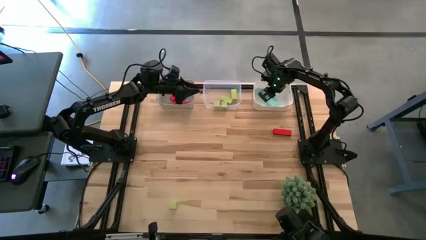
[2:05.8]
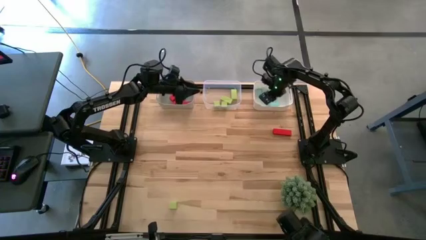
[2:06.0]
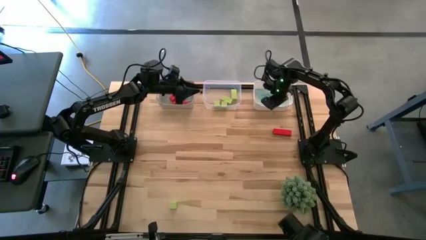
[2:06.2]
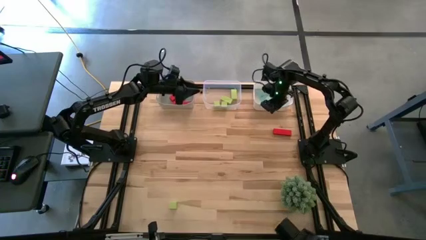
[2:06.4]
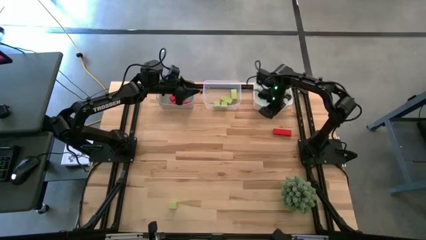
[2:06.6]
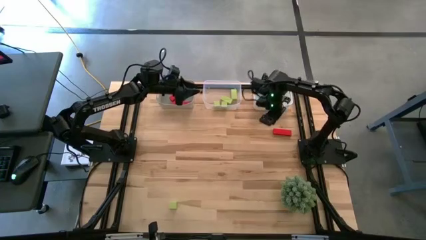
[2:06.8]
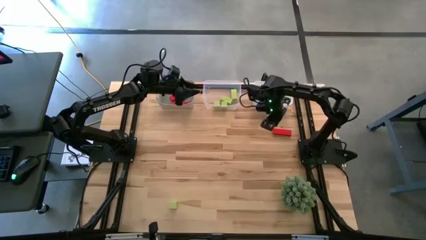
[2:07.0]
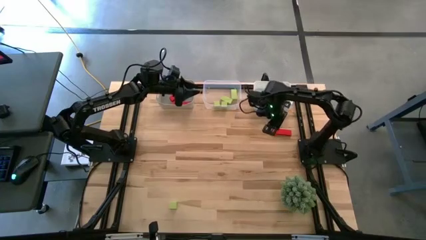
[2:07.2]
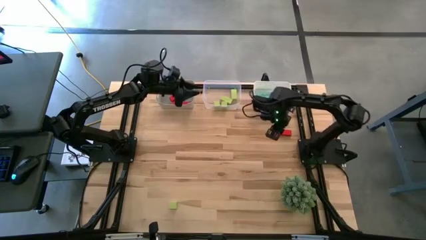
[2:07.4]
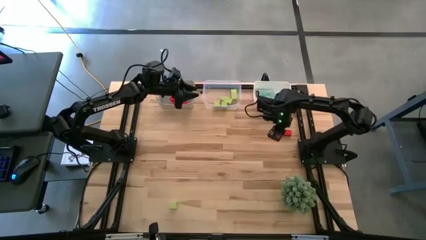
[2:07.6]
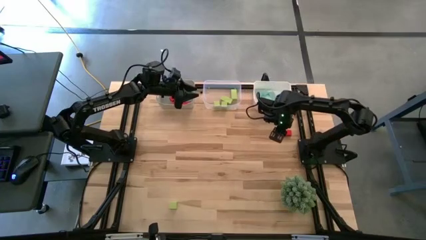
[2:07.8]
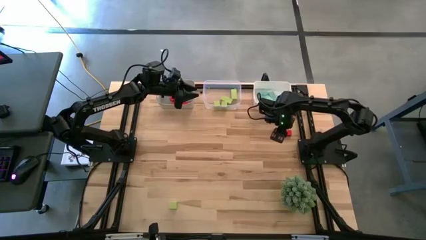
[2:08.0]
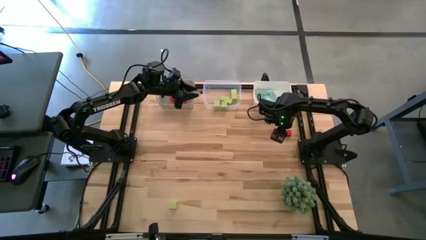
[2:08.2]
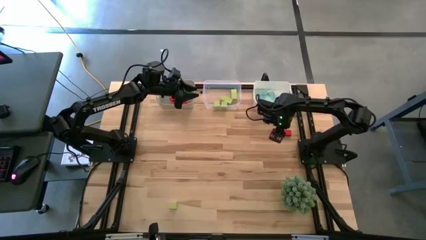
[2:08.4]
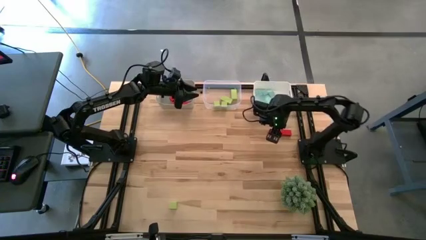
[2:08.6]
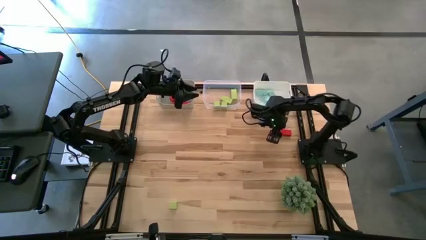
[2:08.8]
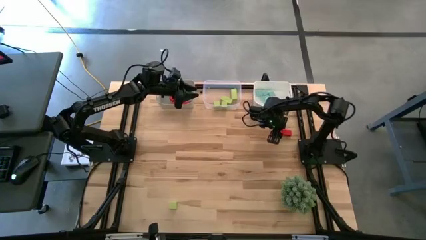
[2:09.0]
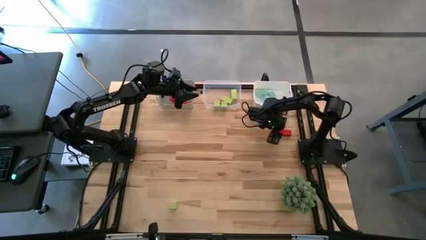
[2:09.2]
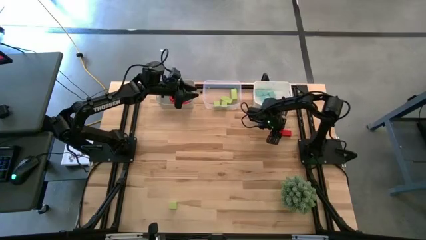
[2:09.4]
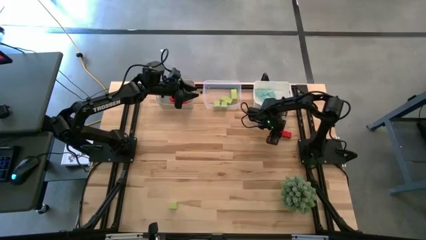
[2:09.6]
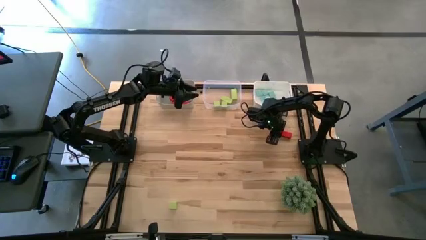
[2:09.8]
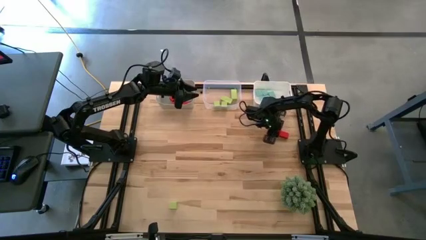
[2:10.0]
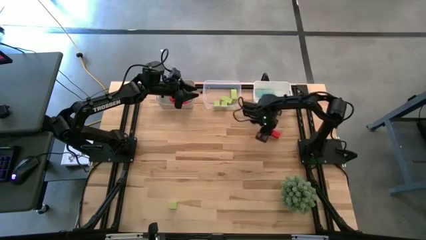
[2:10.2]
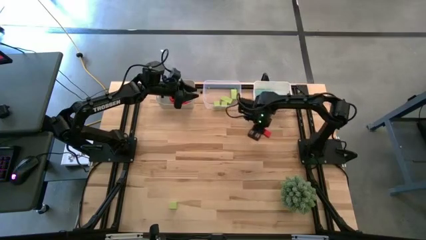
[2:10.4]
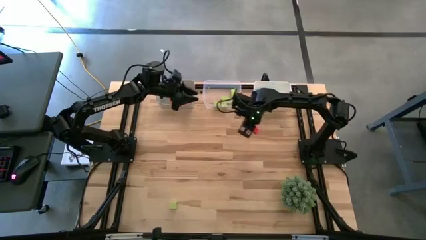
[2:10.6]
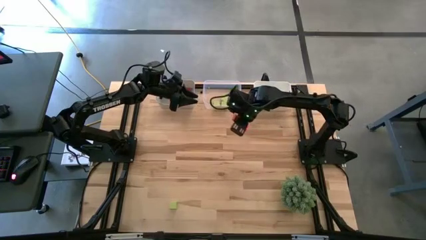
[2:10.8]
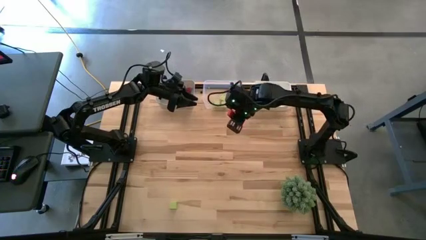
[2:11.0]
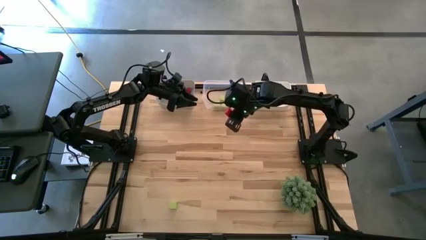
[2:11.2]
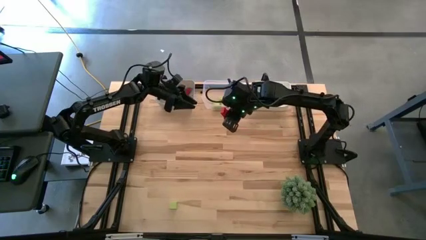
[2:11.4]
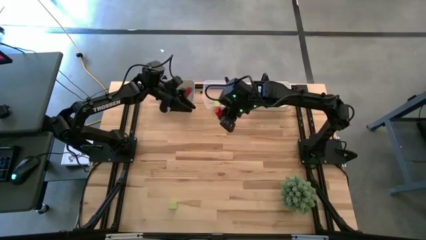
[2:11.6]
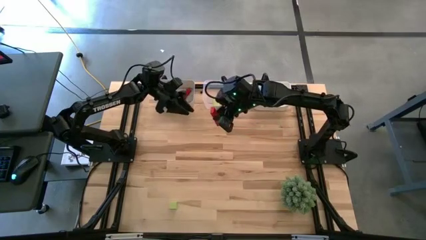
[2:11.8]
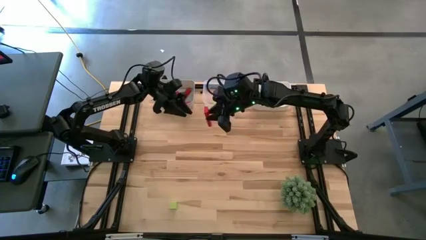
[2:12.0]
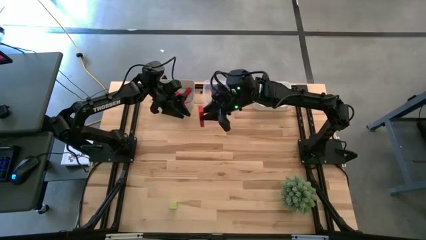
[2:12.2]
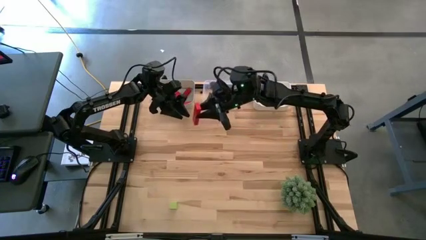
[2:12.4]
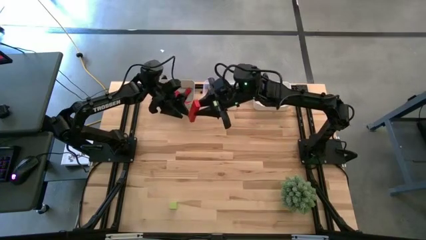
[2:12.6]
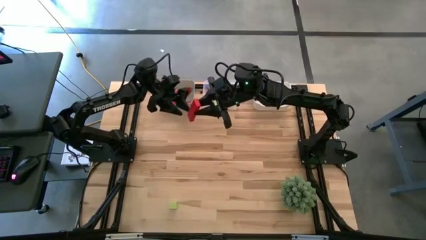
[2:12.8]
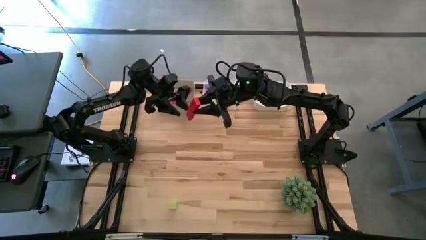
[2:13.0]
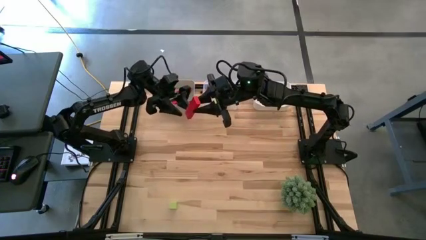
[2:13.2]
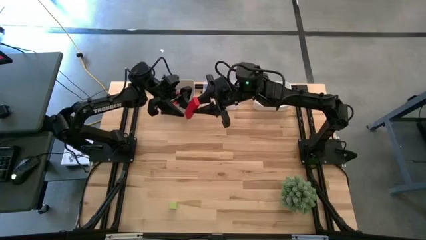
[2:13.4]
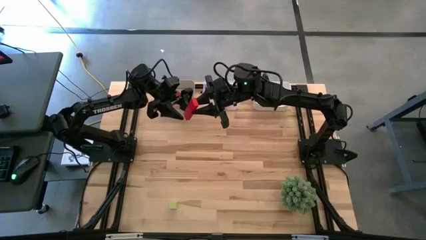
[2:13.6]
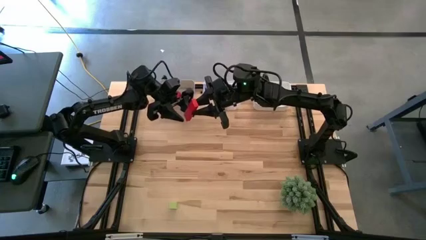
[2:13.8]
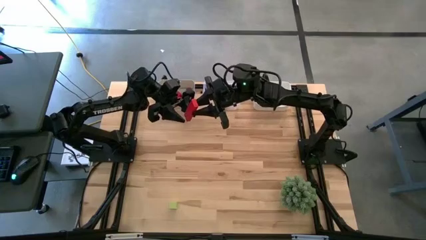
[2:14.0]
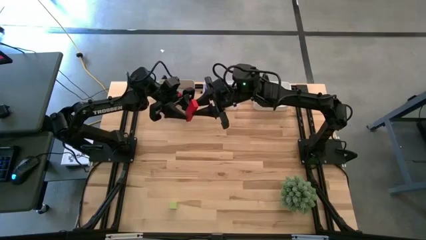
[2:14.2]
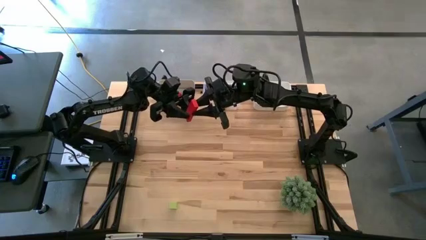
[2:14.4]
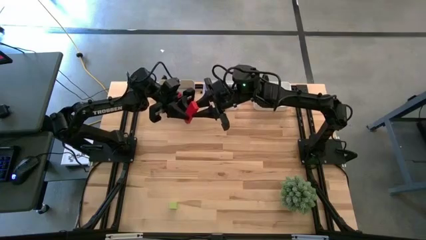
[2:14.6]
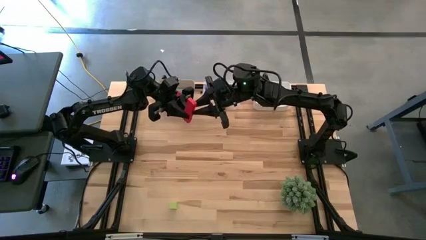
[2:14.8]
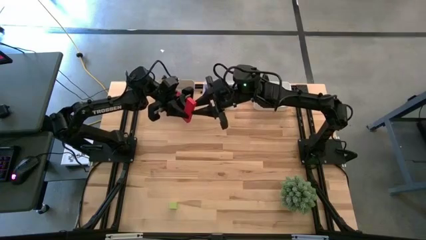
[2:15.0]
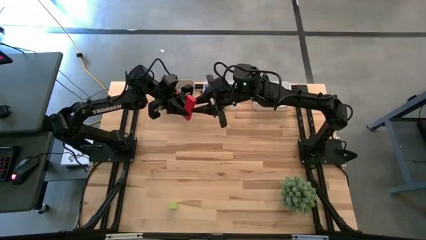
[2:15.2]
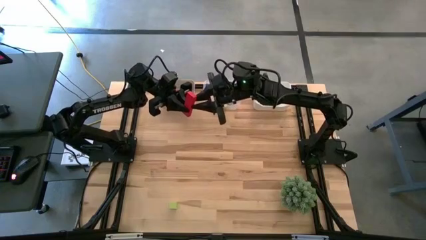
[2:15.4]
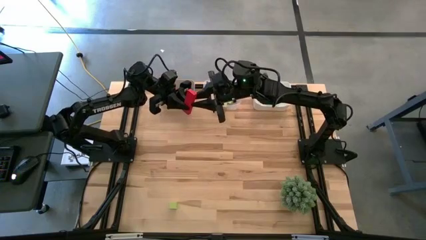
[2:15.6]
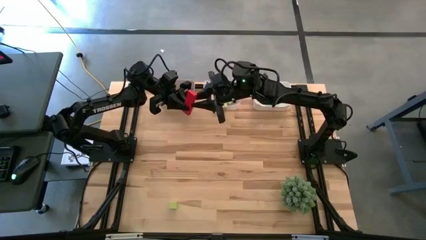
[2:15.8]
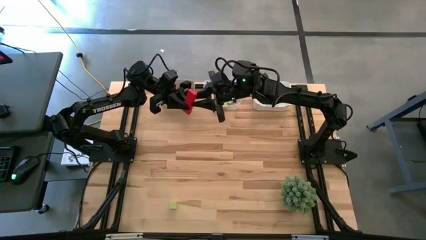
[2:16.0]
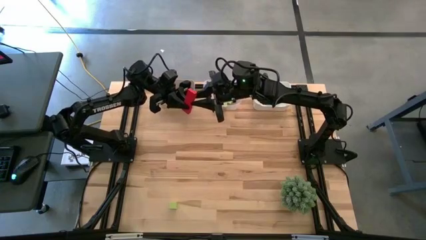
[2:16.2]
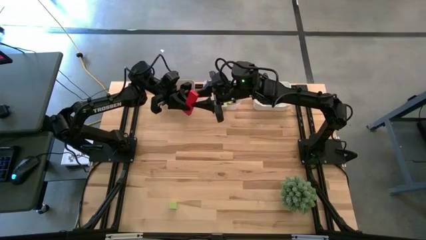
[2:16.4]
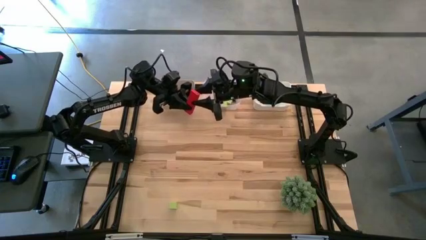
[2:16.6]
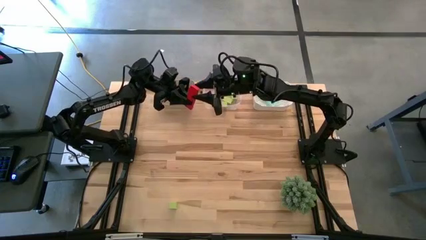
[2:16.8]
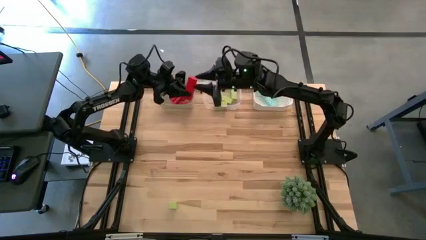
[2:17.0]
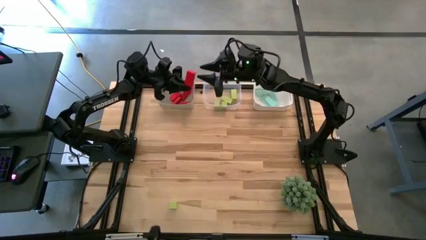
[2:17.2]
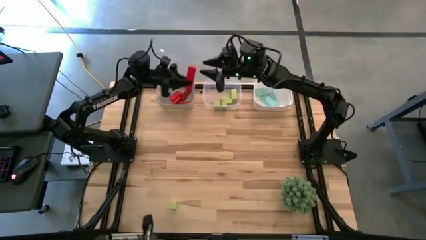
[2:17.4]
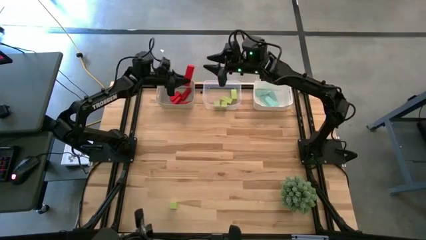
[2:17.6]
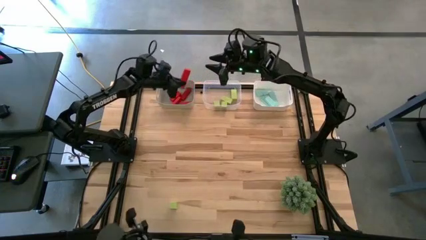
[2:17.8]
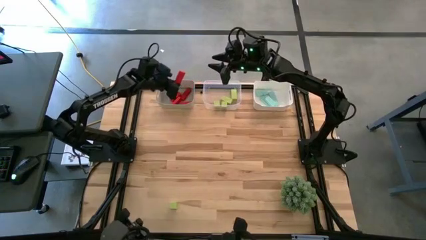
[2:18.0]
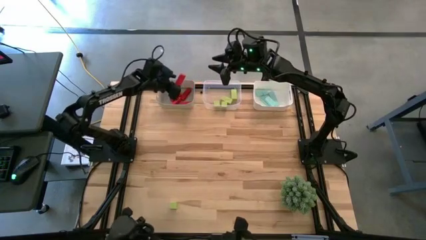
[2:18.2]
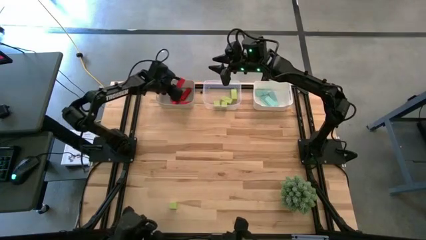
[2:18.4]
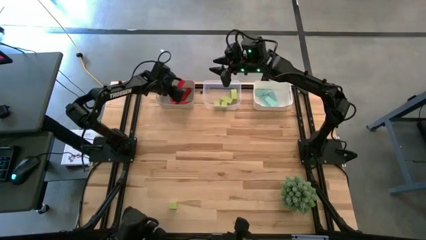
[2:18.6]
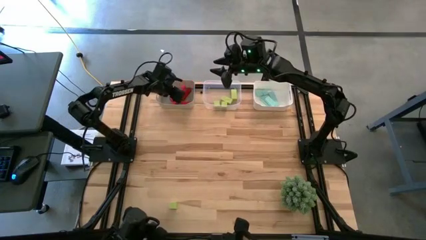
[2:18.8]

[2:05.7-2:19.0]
Task: Sort & place blocks by color
Put the red block into the gray bin

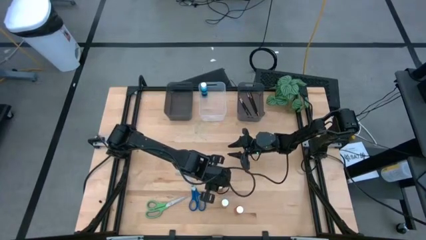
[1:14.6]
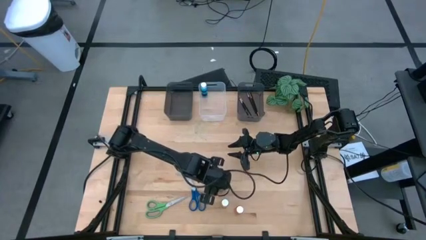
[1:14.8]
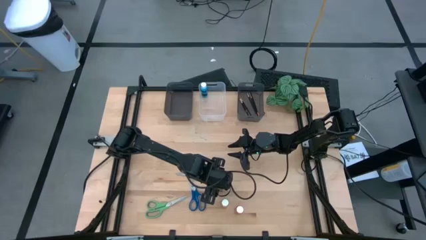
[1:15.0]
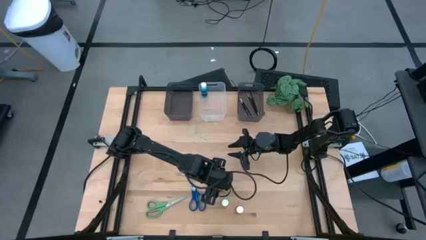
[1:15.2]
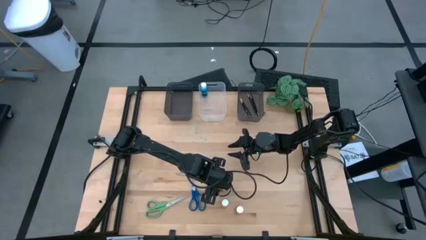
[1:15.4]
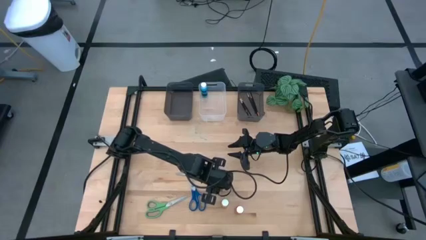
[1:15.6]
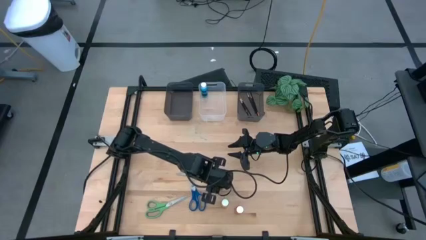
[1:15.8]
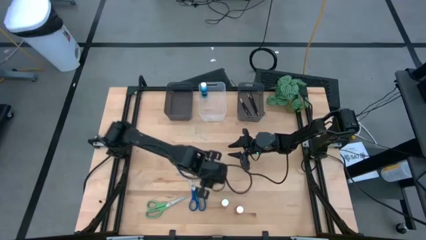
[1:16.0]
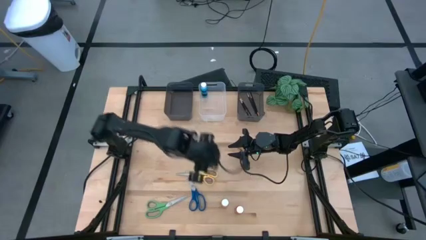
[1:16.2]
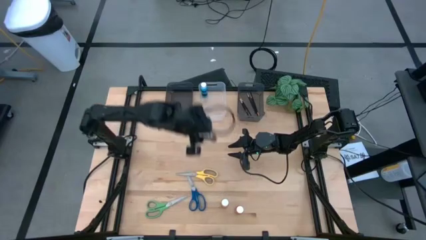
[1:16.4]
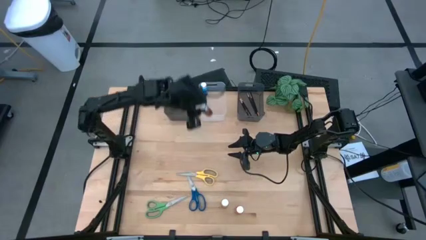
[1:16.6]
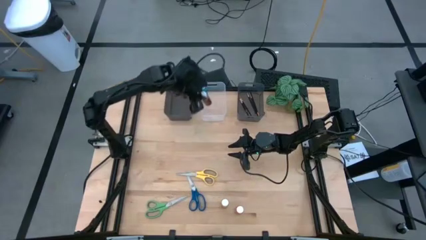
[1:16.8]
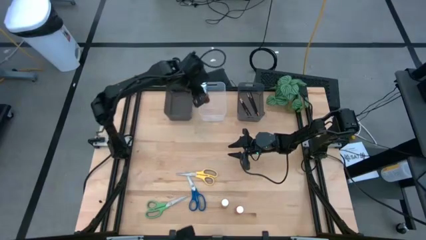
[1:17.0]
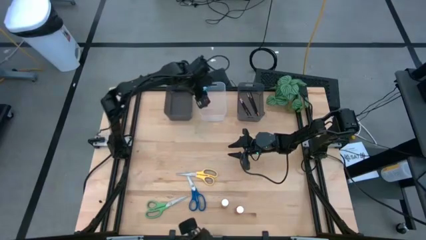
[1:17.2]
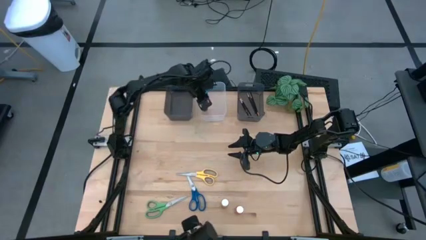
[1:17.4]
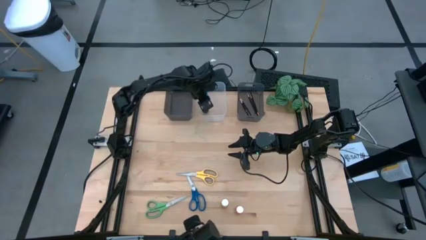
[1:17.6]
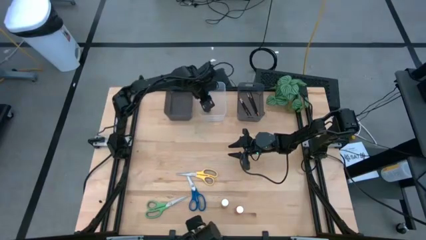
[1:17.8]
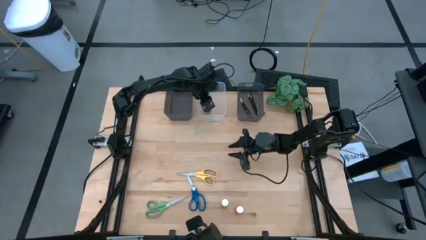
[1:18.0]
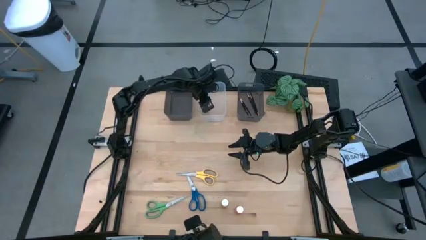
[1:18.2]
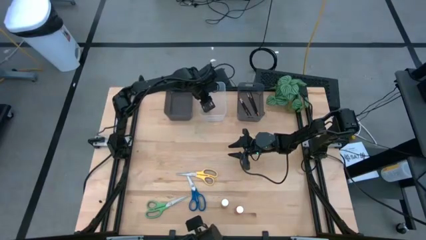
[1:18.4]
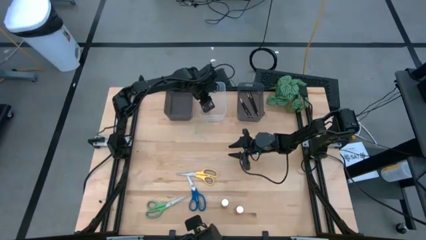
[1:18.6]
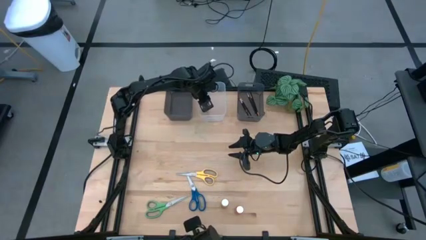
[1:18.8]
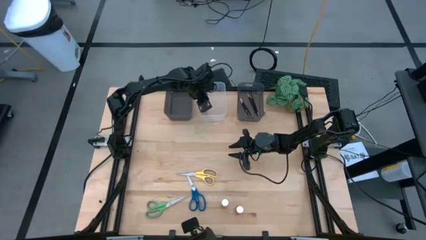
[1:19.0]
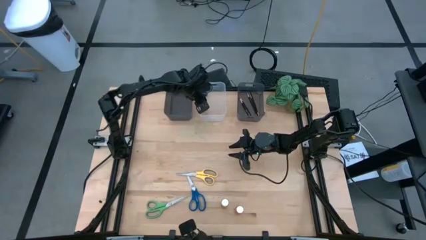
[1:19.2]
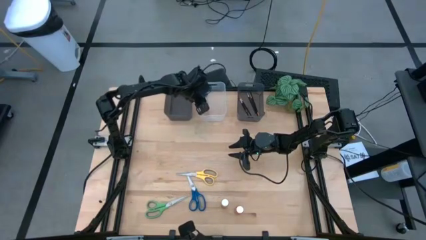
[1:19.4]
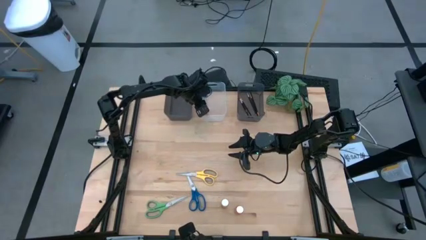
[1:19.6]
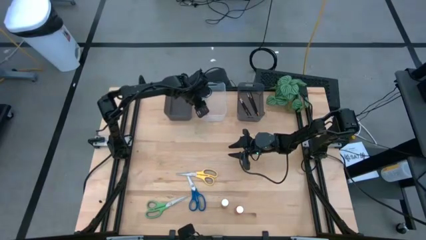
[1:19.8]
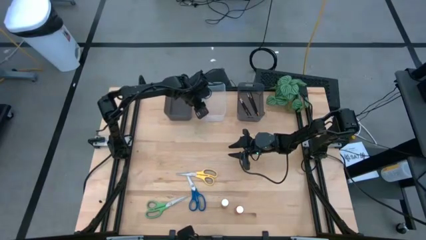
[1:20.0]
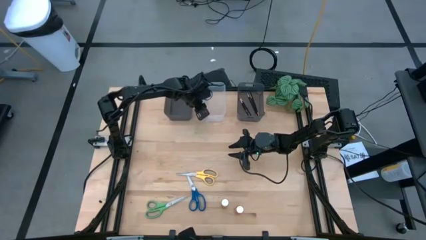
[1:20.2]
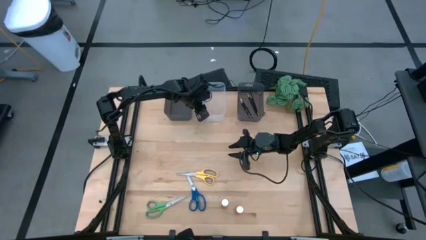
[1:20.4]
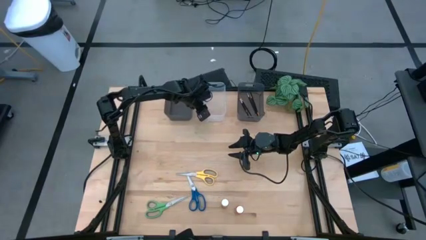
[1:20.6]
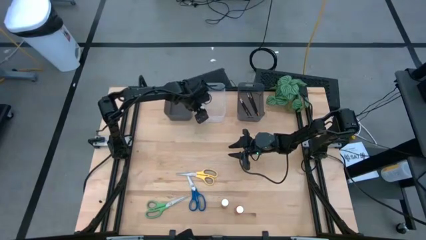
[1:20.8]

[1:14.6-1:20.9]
Task: Pick & Place Paint Supplies
Put the brown paint bottle into the transparent bin
